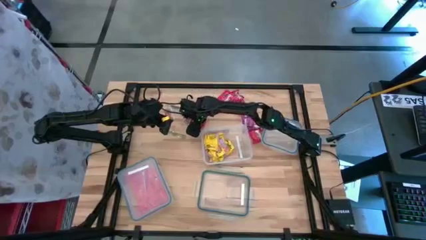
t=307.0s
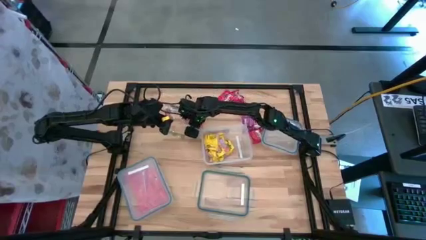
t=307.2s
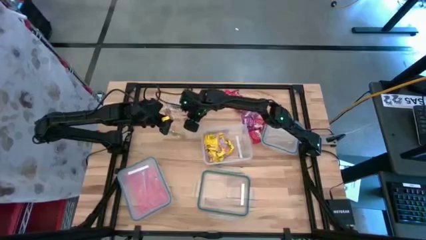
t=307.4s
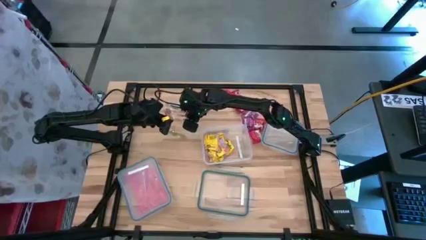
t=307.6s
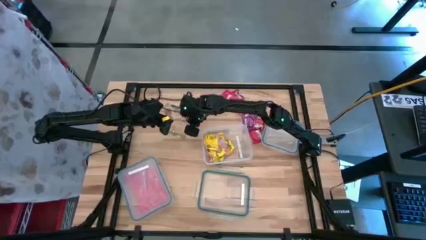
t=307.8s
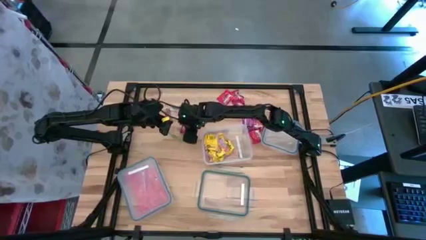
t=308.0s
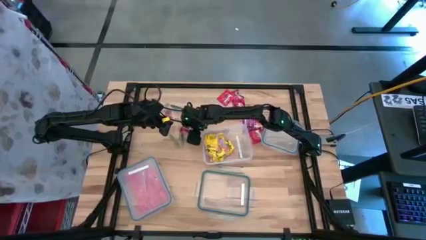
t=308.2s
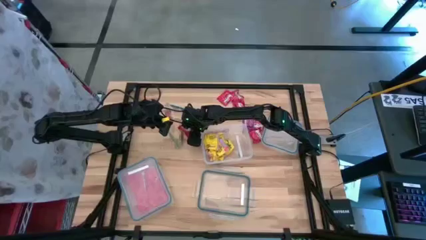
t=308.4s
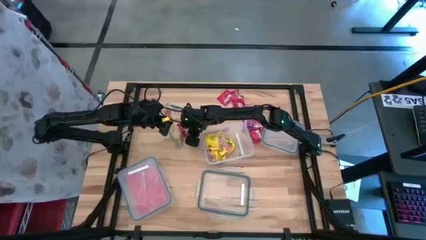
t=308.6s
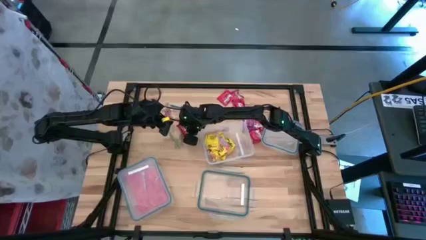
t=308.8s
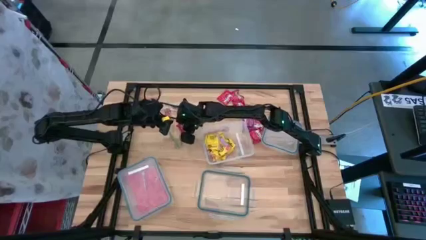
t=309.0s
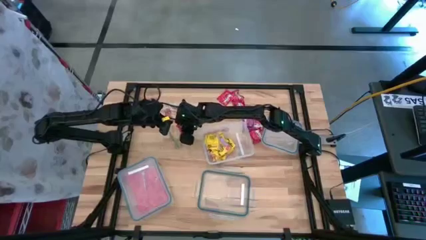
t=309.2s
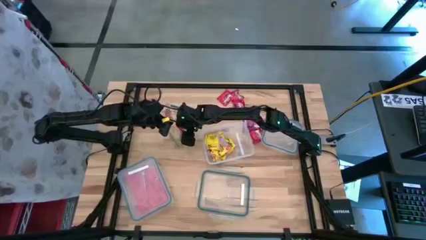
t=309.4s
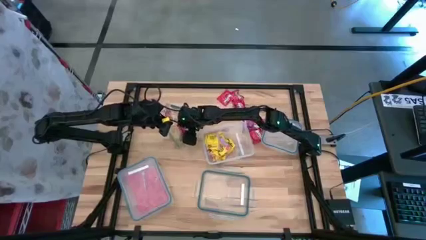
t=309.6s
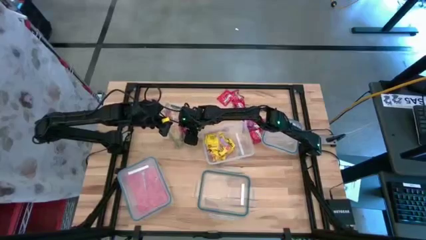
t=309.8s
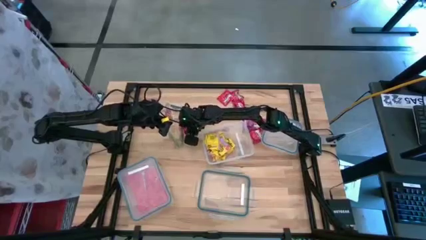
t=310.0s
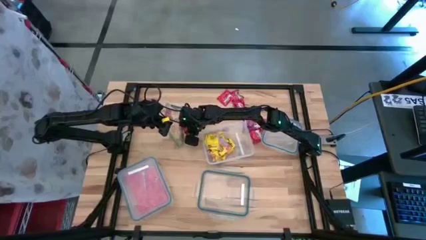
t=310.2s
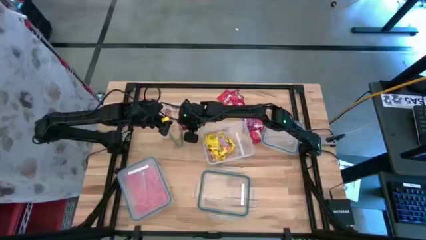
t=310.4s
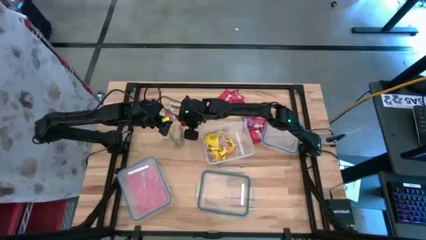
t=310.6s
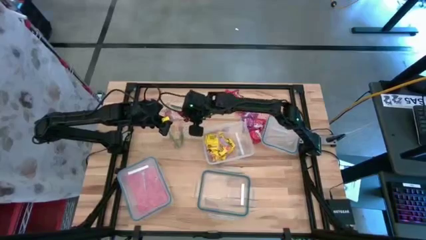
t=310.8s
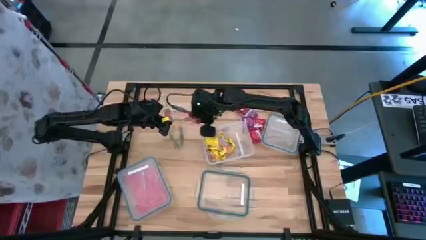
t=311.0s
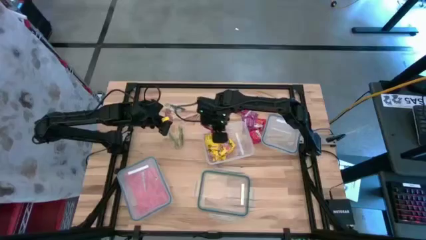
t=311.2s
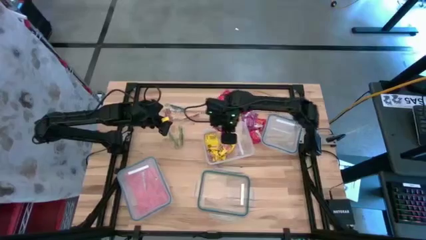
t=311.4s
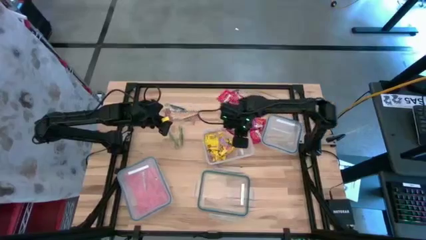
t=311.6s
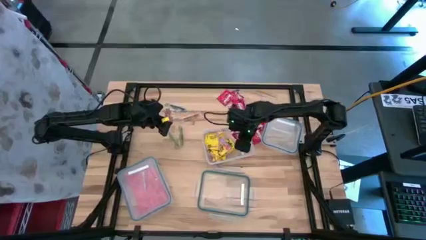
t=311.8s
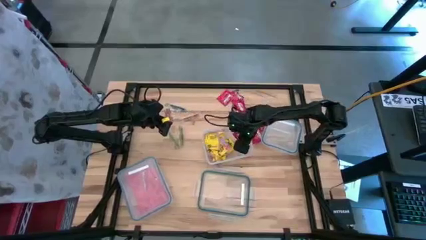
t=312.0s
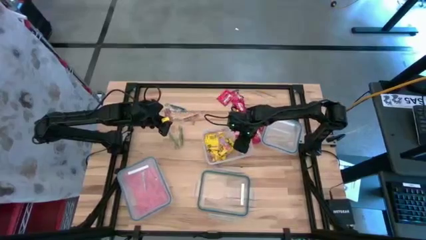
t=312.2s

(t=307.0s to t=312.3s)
Task: Sort candy
Put the red candy into the rectangular transparent bin

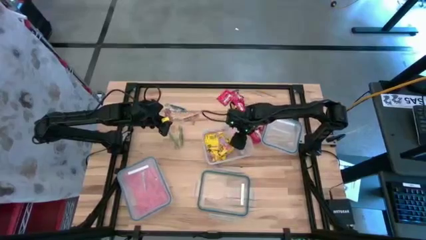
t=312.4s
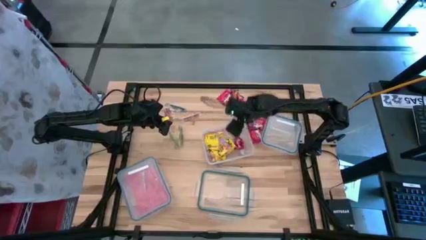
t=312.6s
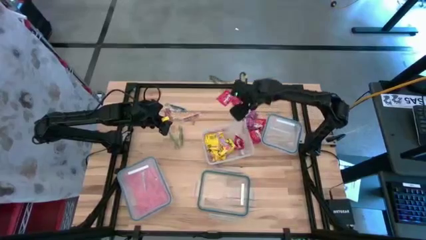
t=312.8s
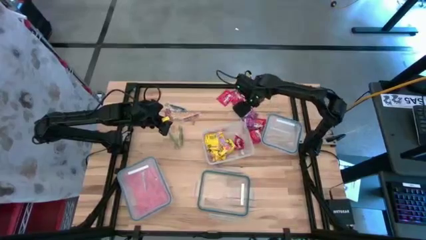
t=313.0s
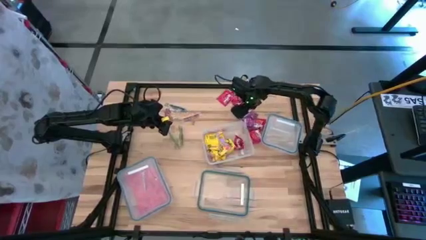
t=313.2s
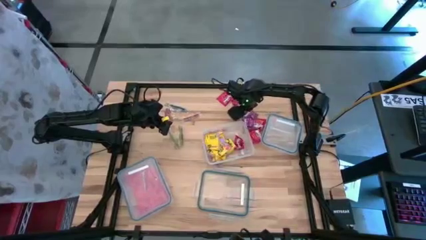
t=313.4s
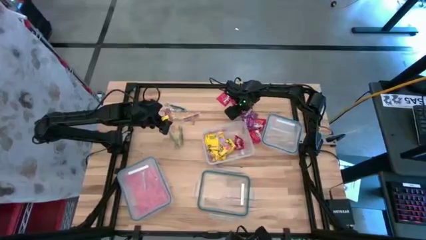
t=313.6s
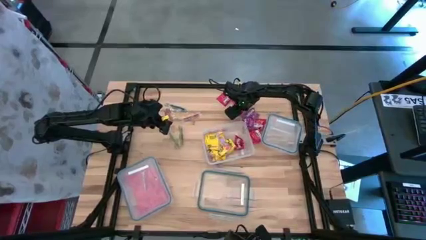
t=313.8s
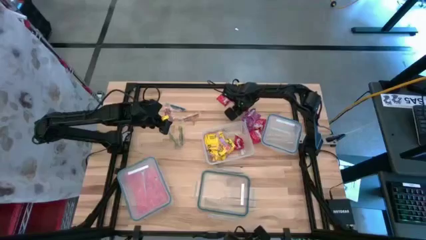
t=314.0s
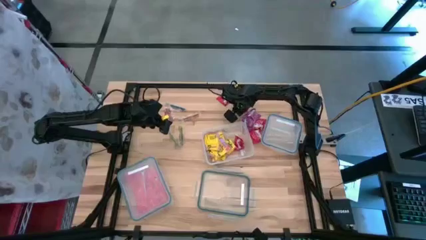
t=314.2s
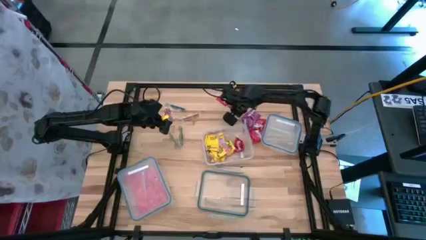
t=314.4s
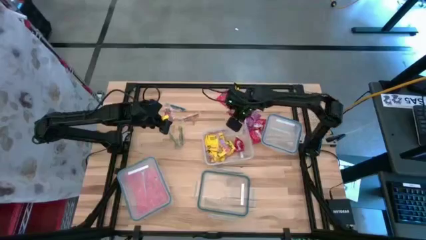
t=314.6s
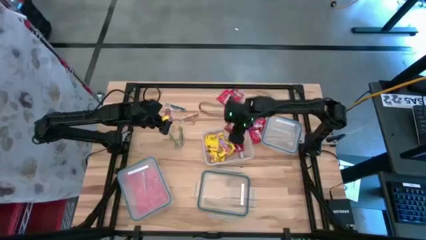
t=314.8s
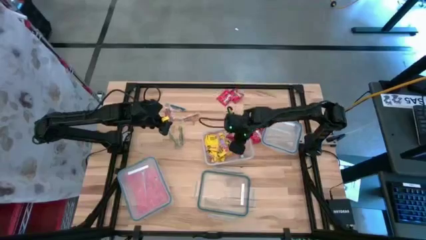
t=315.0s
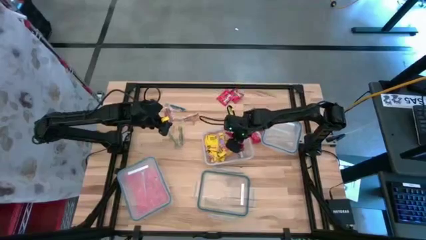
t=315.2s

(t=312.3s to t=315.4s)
Put the red candy into the rectangular transparent bin

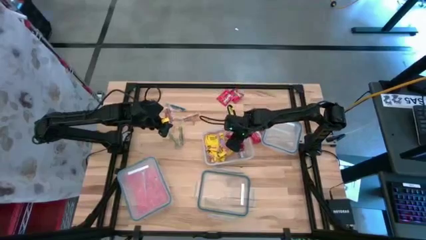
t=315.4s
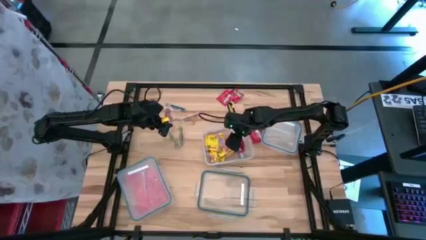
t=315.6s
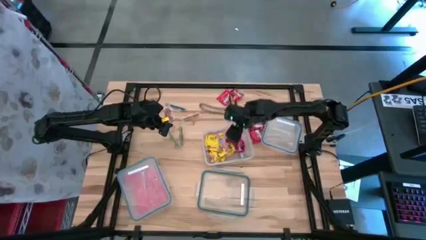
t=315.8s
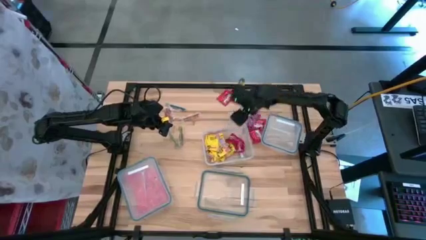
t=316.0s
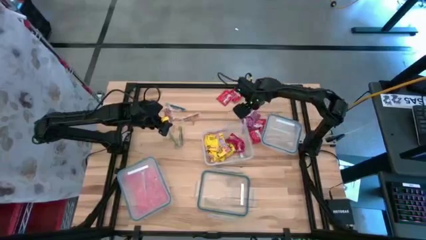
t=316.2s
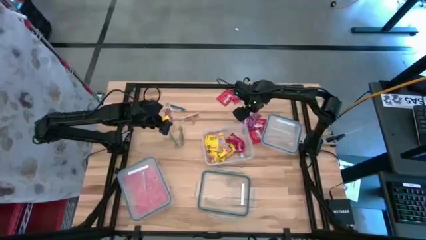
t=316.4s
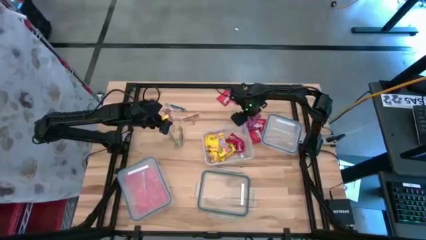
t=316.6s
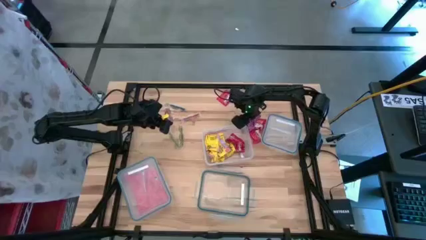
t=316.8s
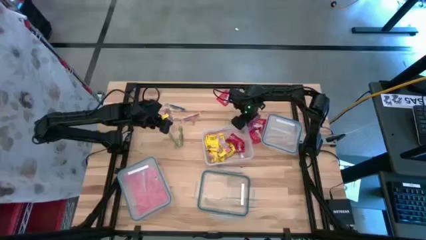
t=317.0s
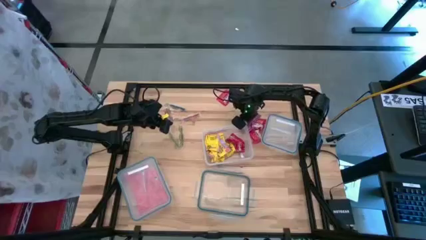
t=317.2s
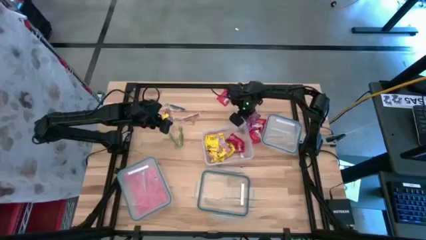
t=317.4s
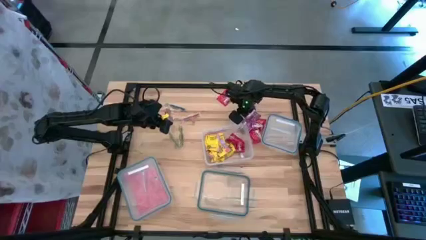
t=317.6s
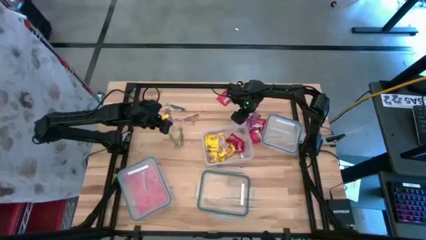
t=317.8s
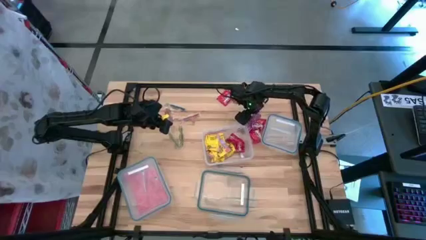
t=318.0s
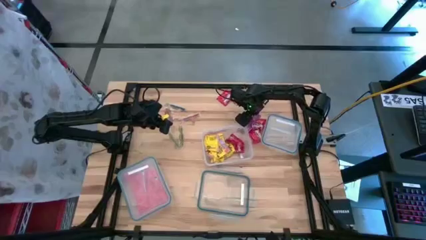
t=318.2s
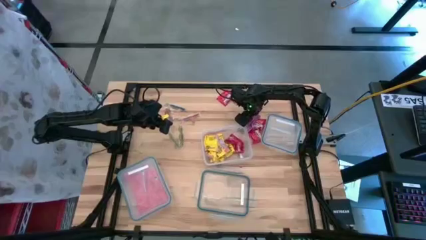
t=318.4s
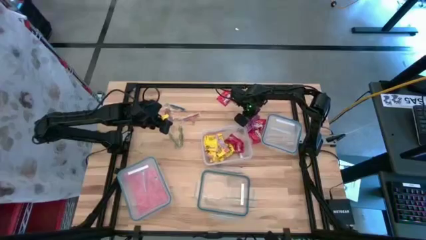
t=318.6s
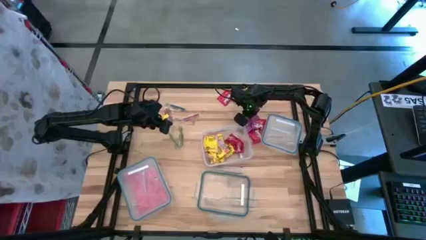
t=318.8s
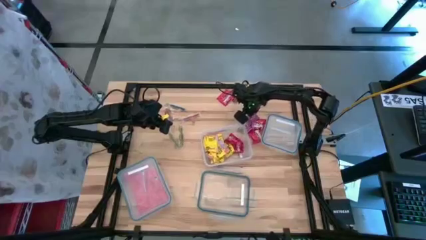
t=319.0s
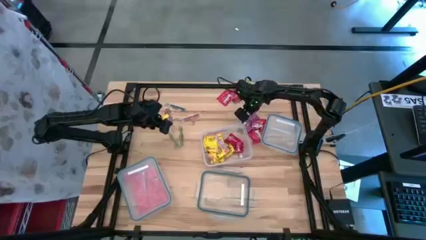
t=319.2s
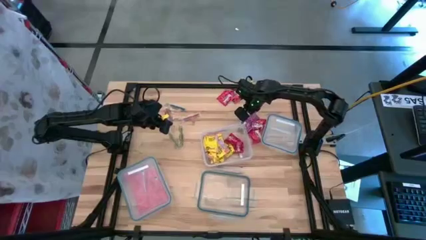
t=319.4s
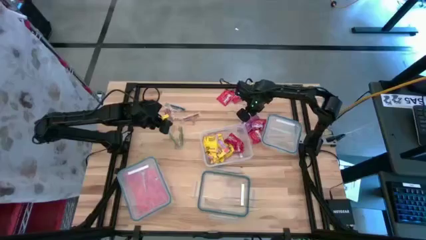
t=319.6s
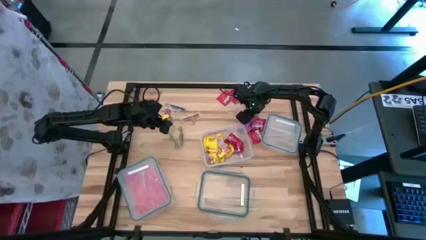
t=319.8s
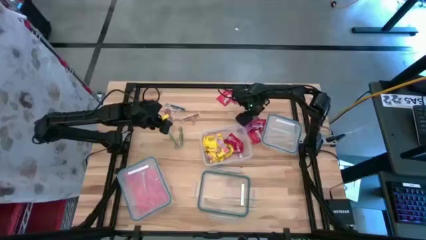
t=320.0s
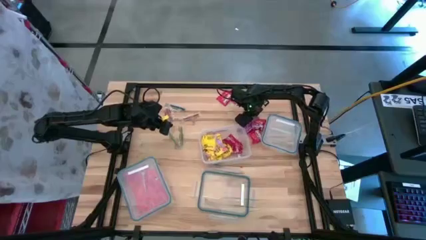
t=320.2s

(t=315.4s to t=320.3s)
Put the purple candy into the rectangular transparent bin

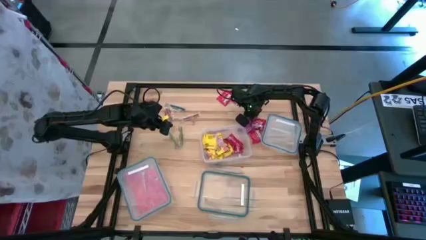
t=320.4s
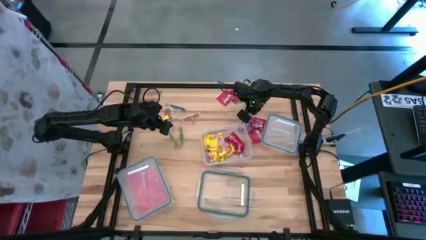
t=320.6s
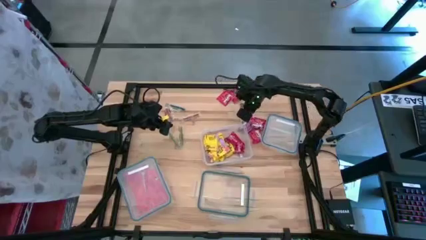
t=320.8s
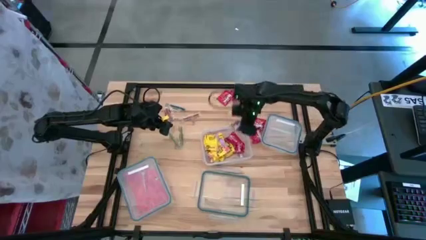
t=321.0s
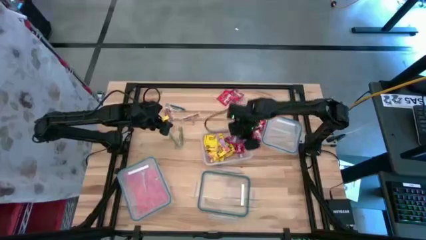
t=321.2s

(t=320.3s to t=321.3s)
Put the purple candy into the rectangular transparent bin

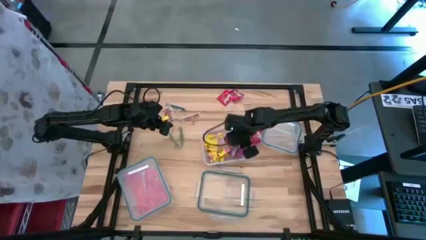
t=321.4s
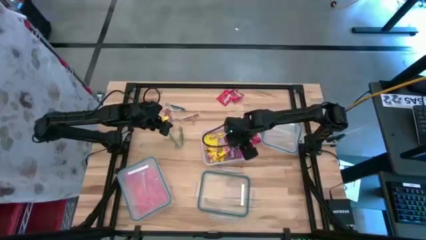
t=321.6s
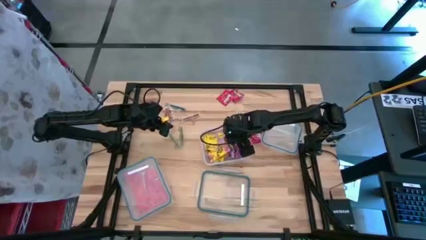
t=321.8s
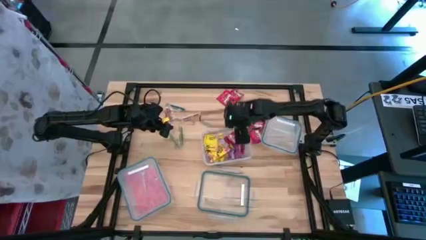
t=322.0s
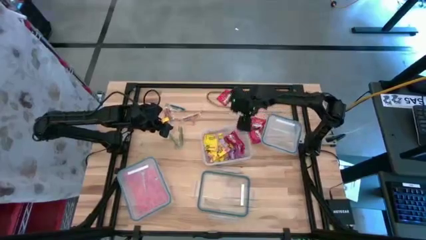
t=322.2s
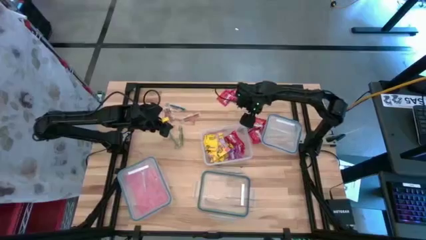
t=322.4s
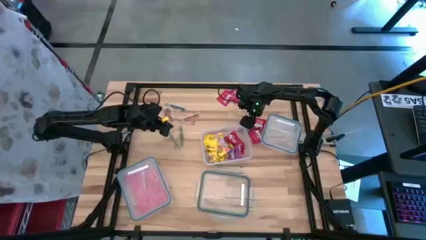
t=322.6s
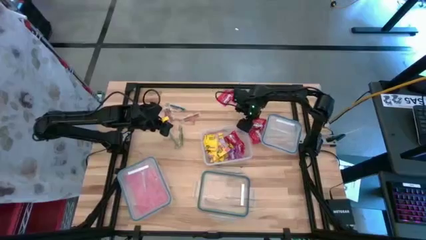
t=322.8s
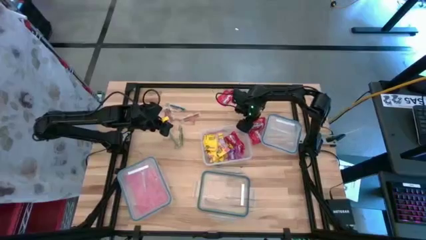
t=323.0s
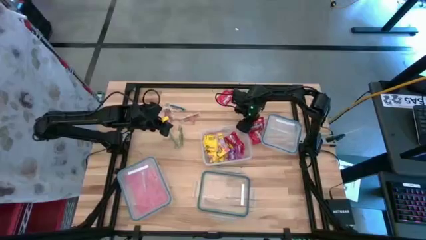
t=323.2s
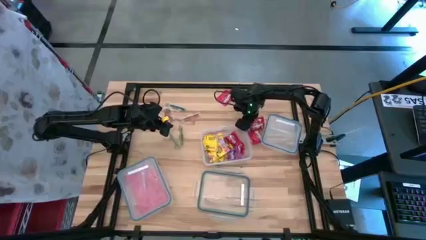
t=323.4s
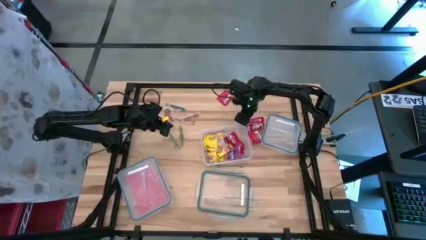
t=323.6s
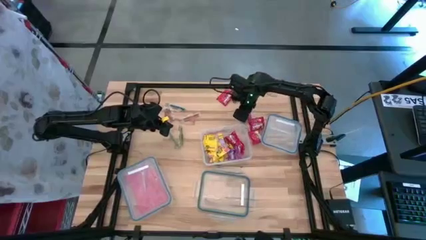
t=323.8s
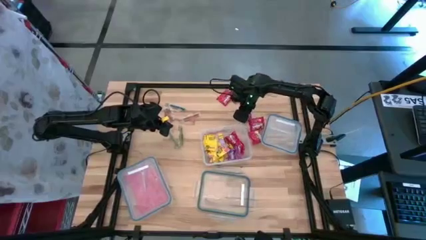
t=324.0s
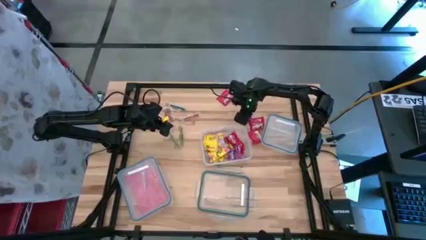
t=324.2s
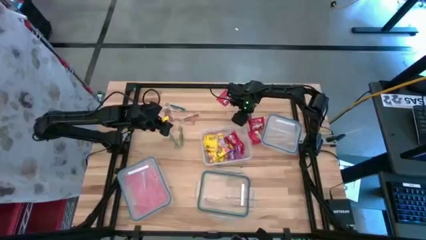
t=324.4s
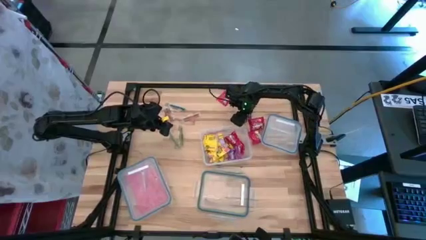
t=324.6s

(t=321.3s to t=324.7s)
Put the purple candy into the rectangular transparent bin
